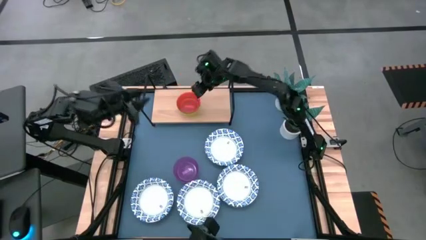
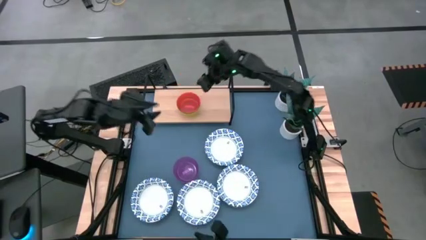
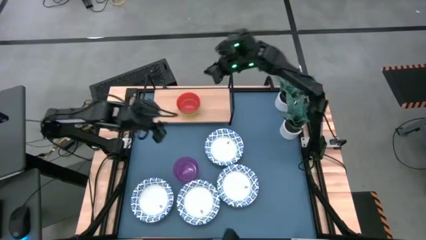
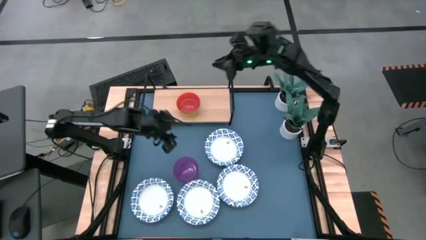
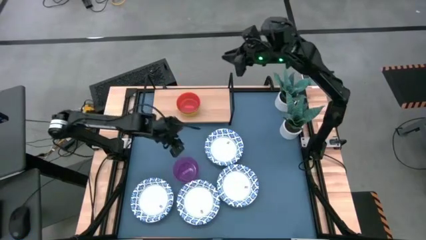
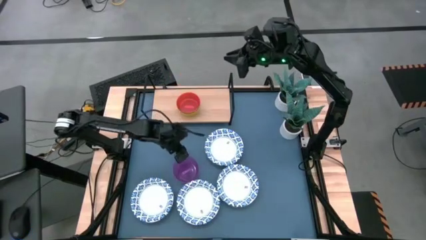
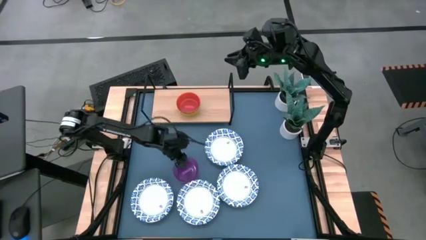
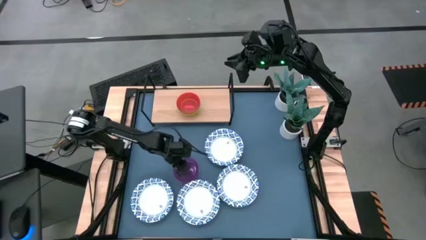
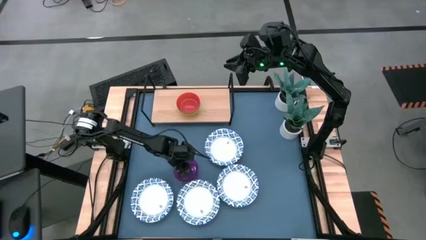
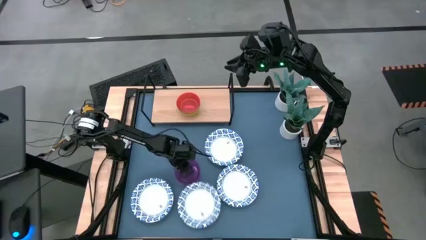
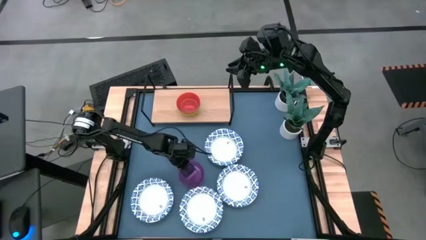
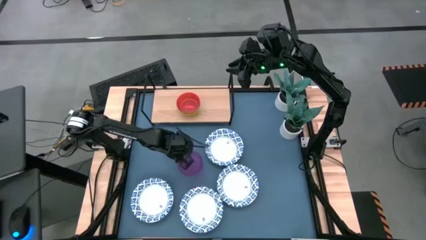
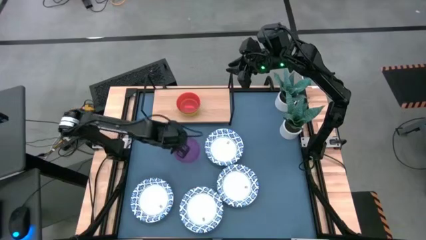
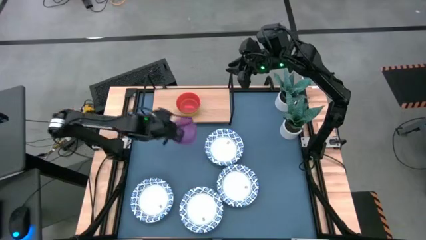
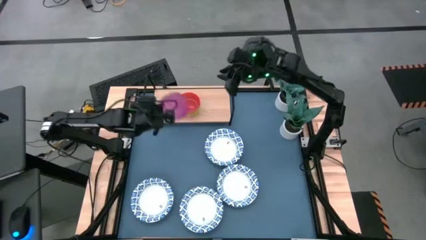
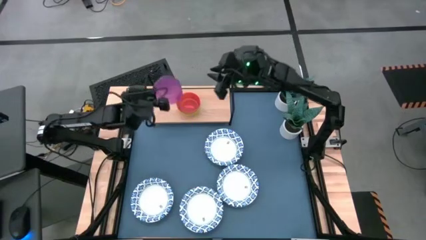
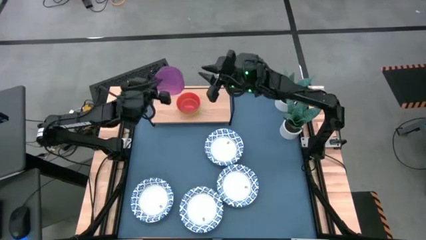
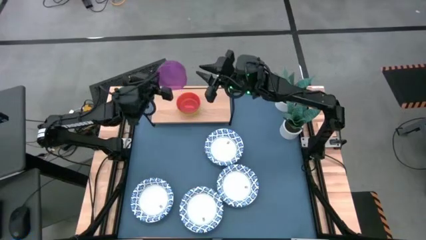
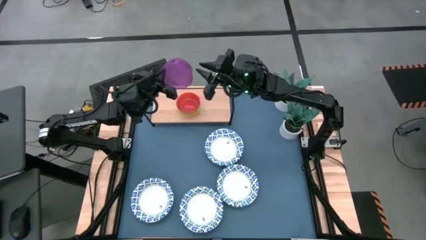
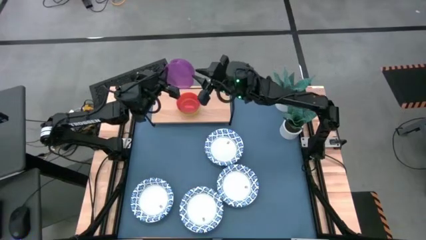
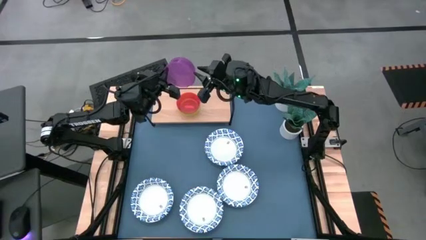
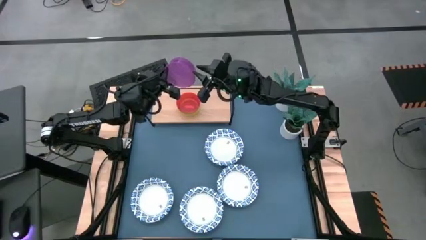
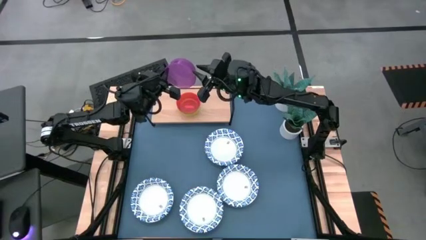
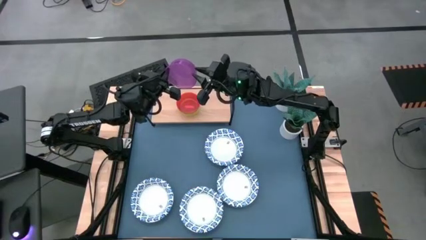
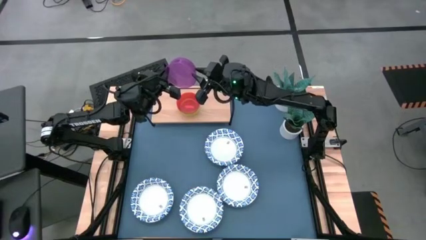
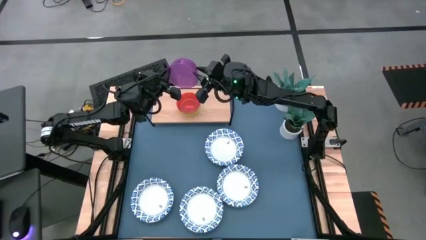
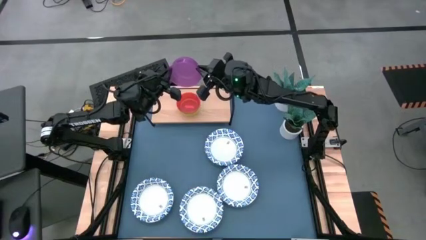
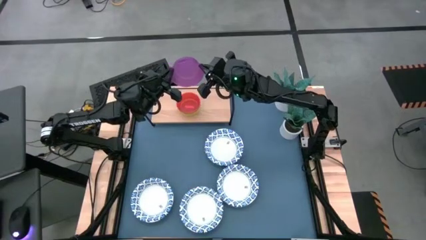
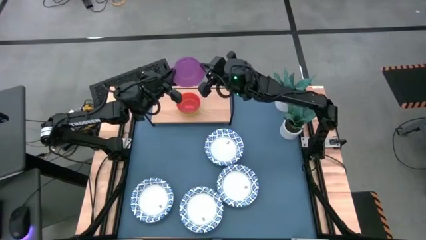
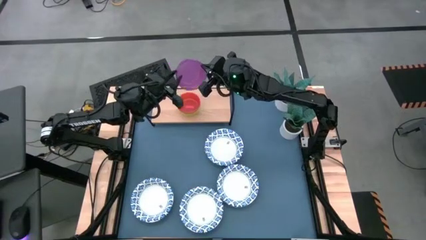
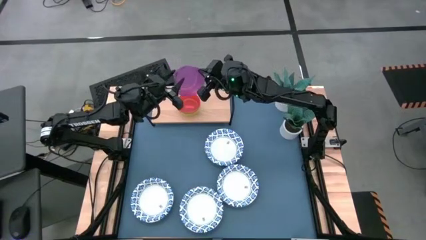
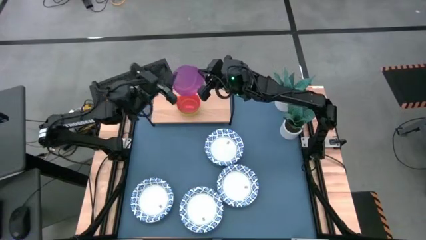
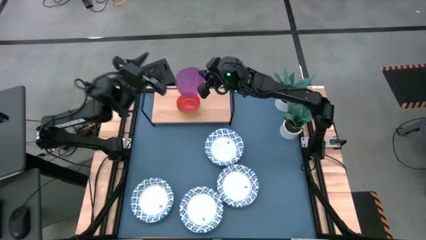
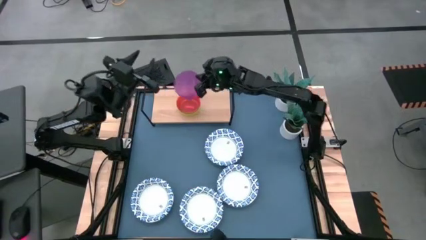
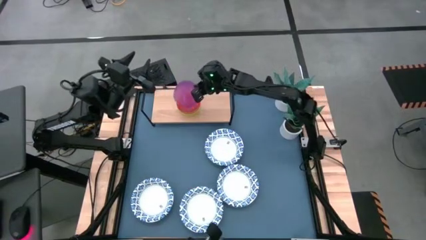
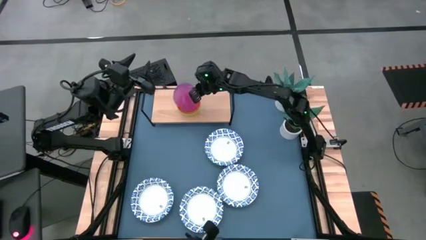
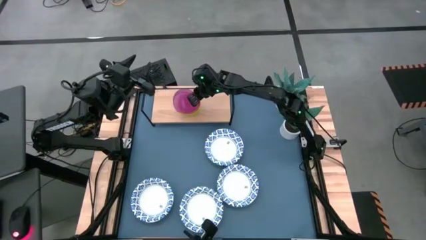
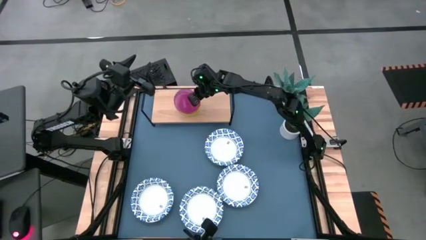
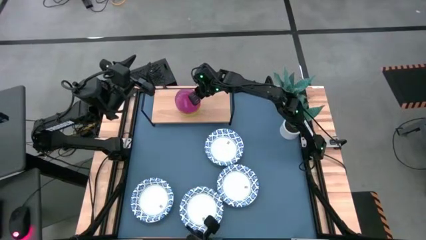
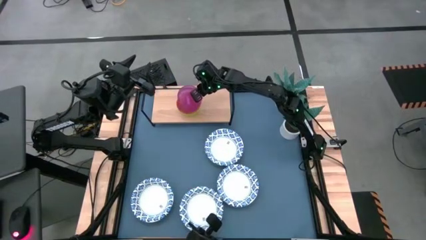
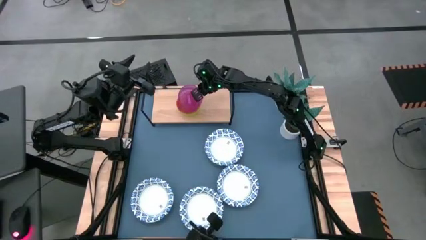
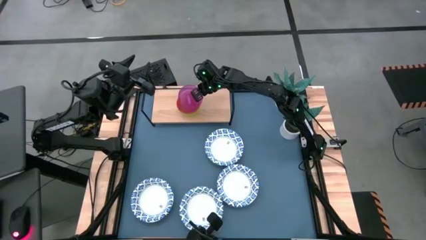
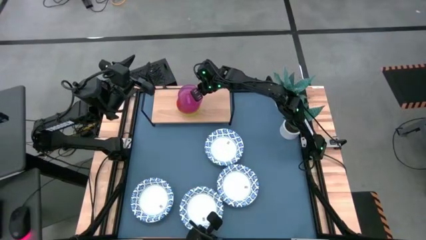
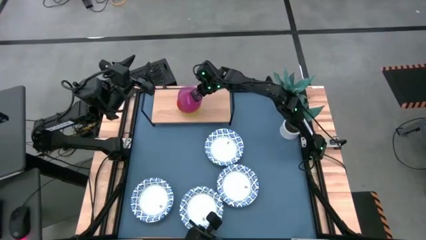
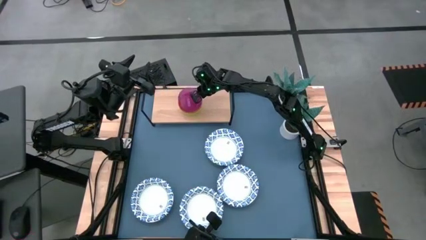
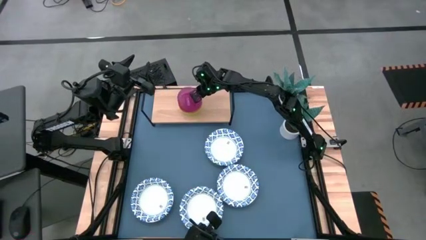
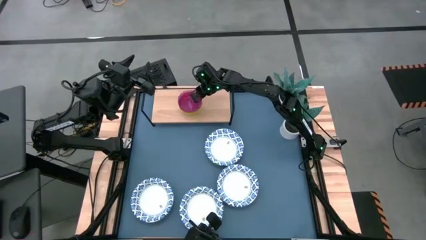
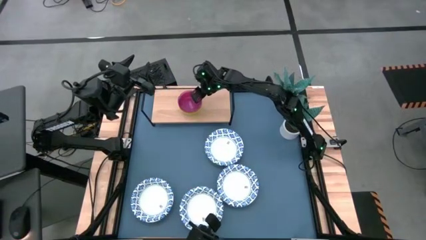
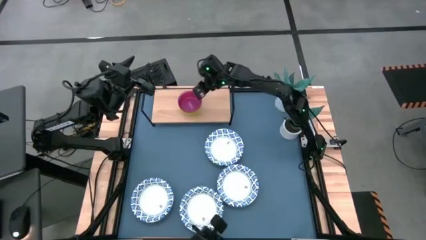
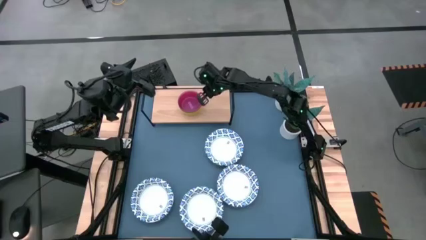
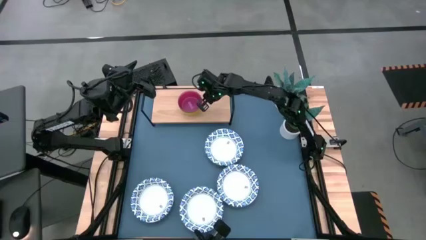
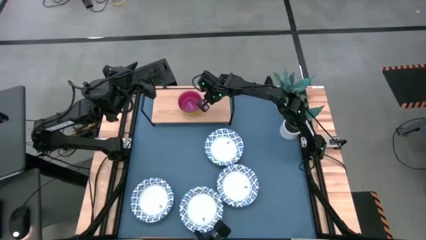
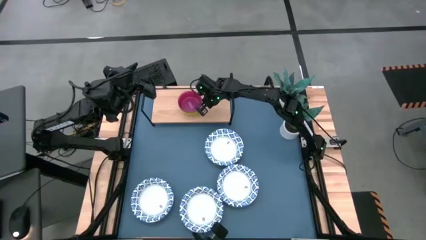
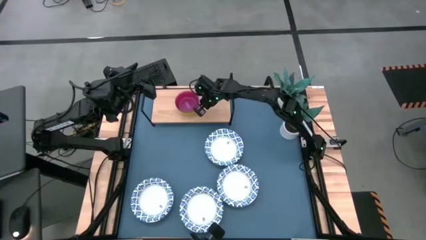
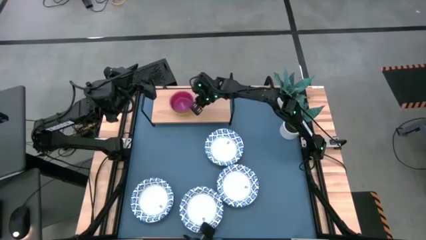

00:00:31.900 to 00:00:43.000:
Task: Place and stack bowls onto a shelf
Stack the purple bowl on top of the orange bowl on the shelf

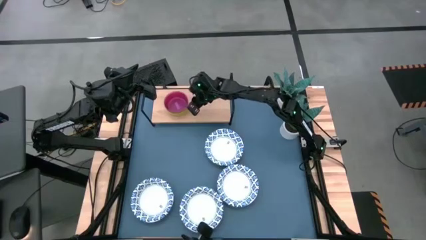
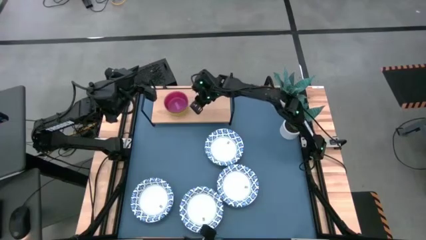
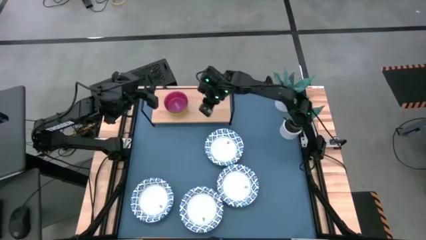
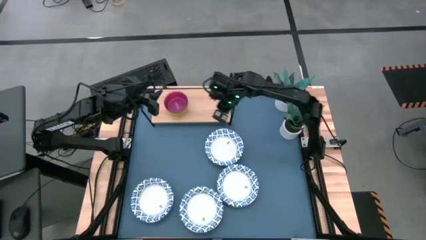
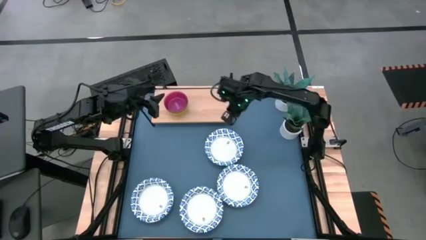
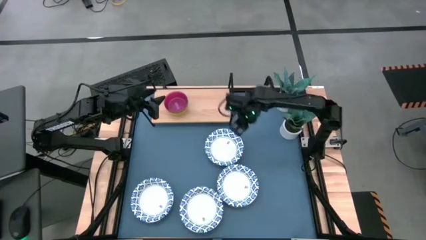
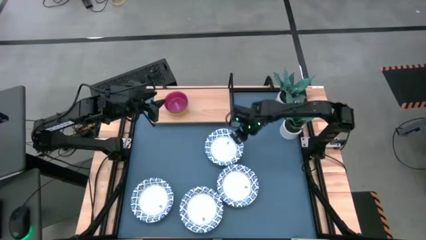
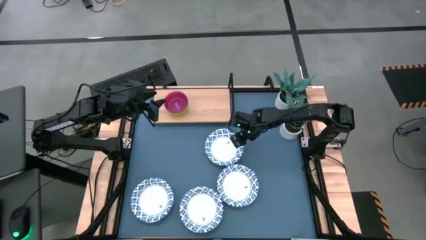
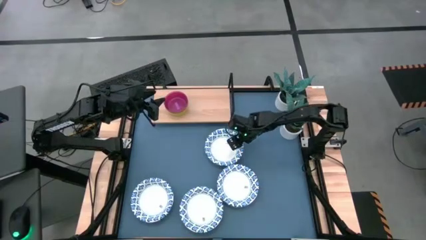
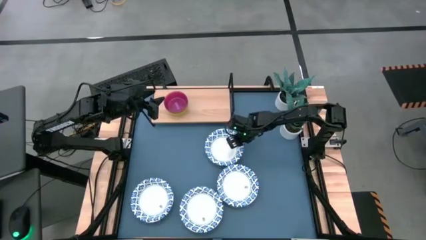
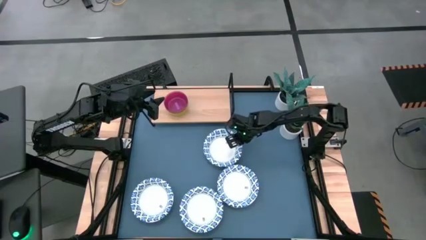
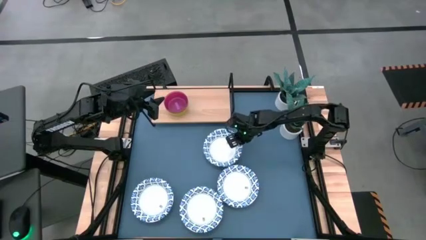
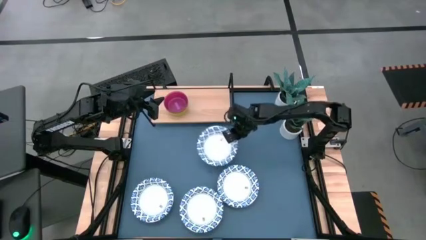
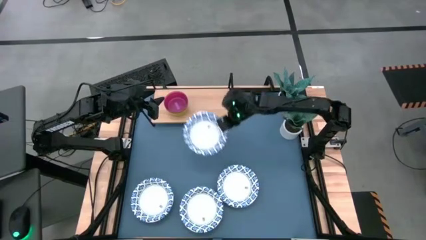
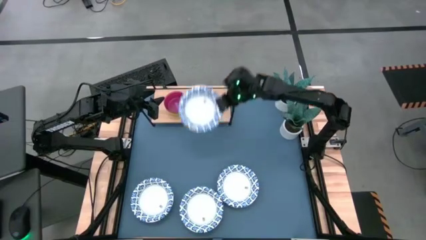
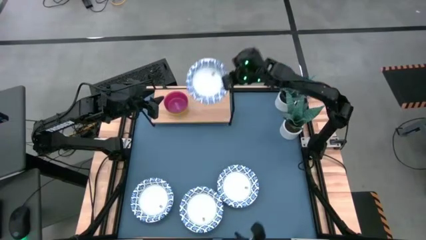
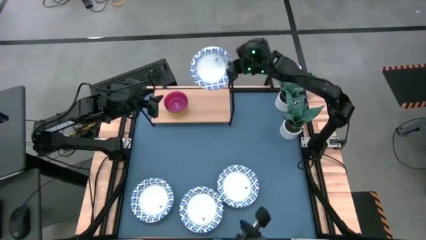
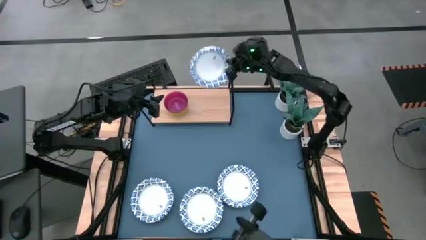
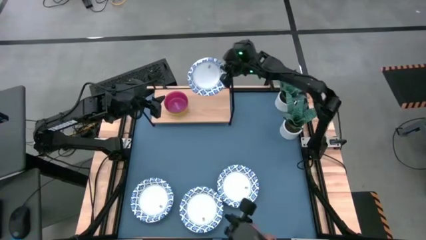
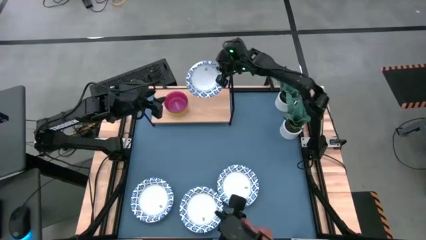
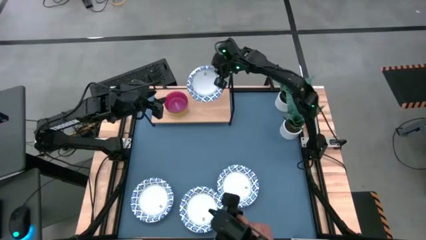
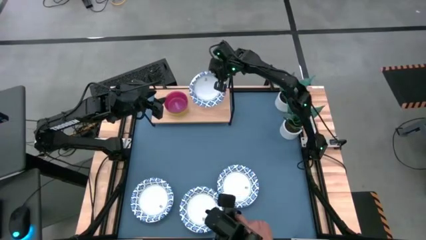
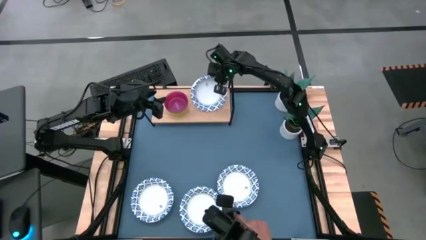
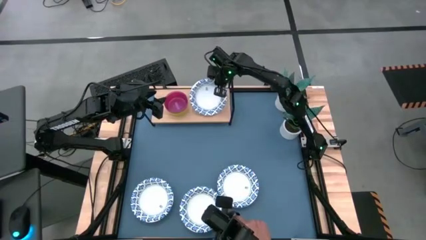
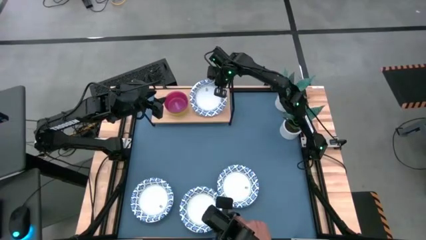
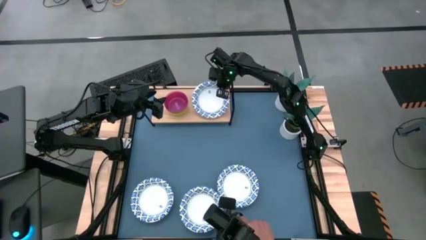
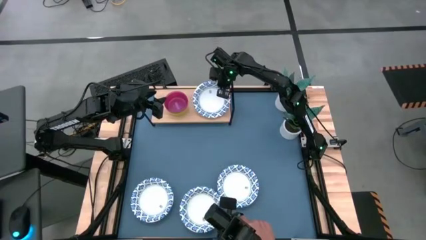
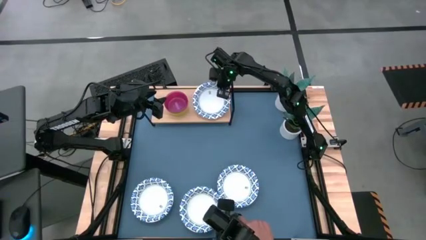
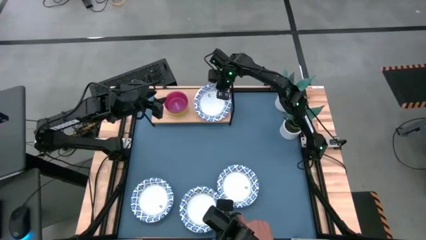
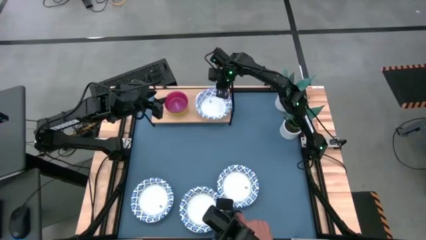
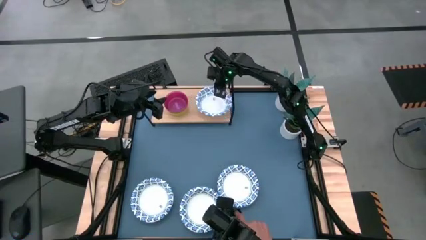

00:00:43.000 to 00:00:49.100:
Put the white bowl on the shelf
